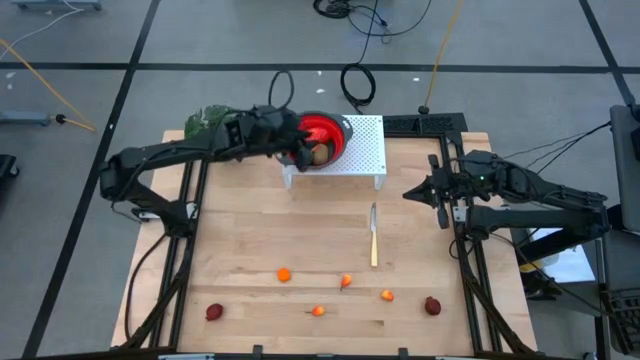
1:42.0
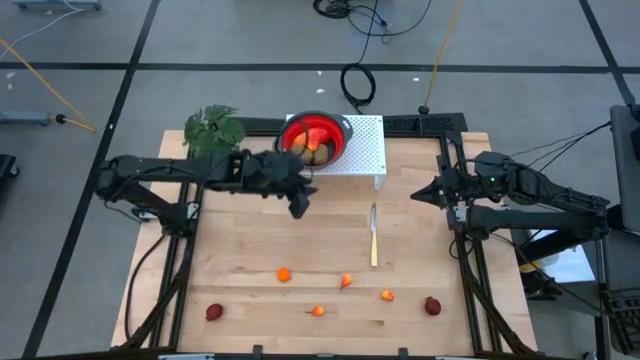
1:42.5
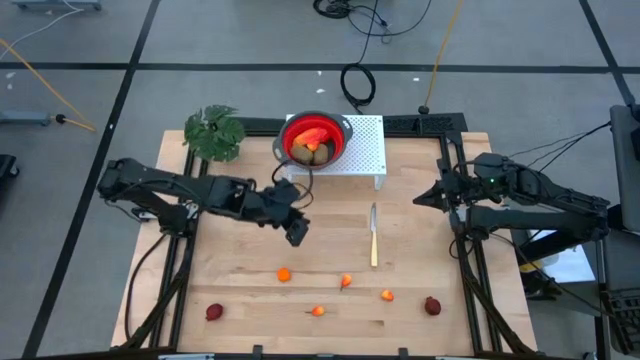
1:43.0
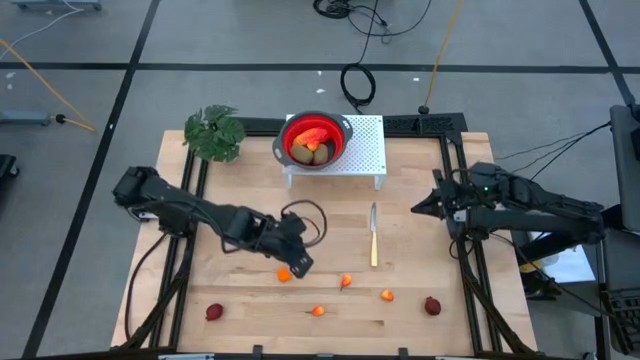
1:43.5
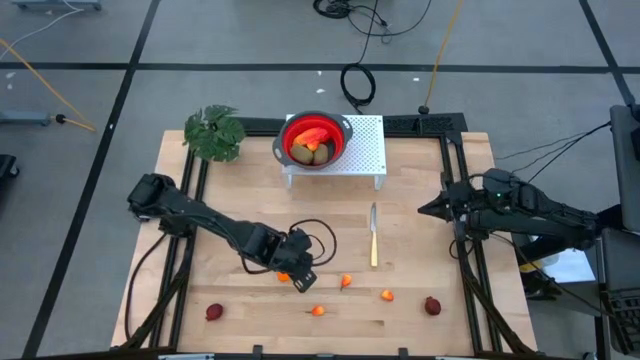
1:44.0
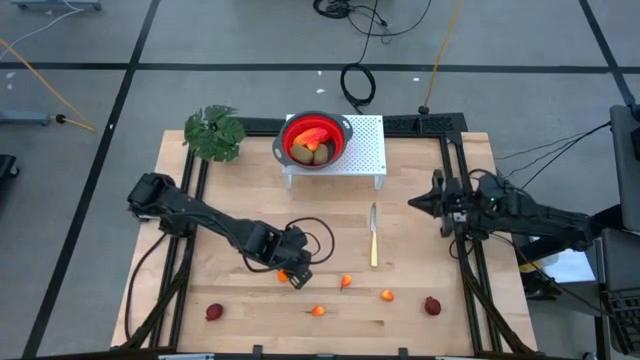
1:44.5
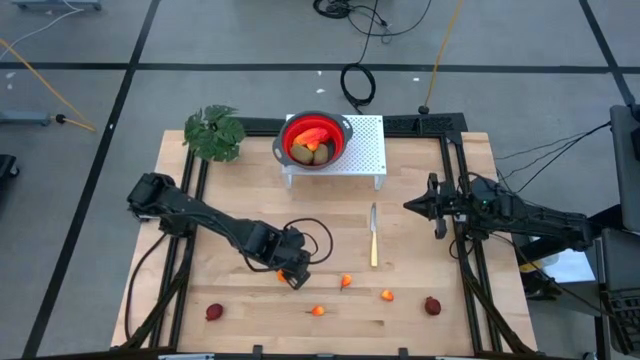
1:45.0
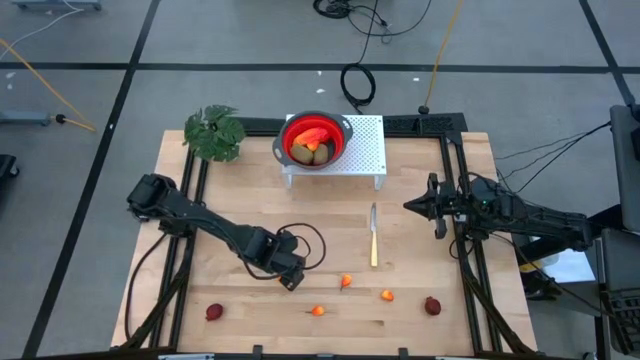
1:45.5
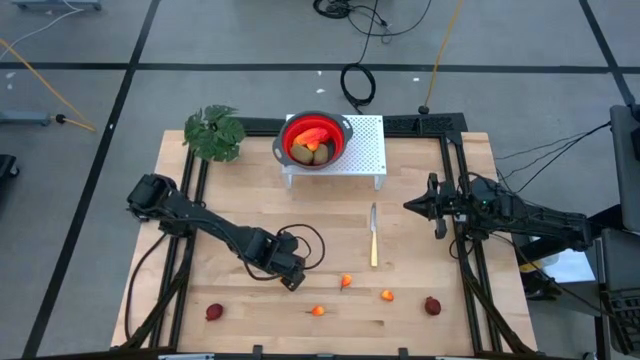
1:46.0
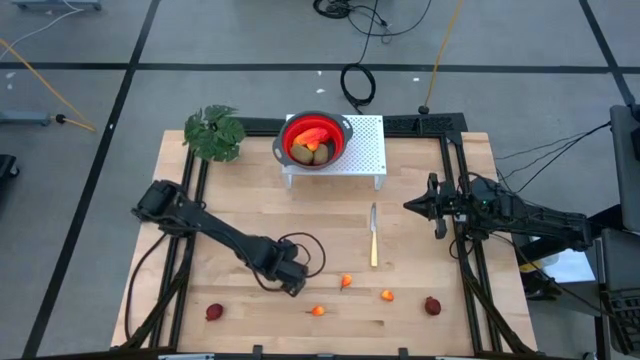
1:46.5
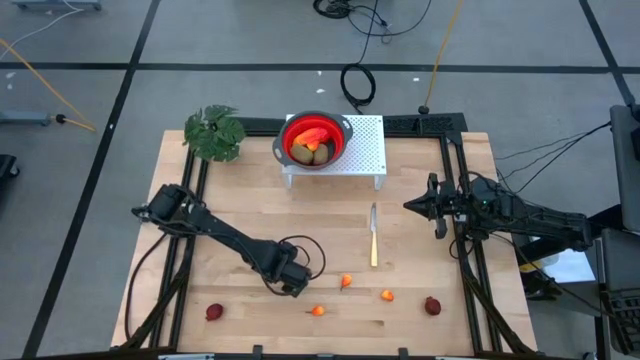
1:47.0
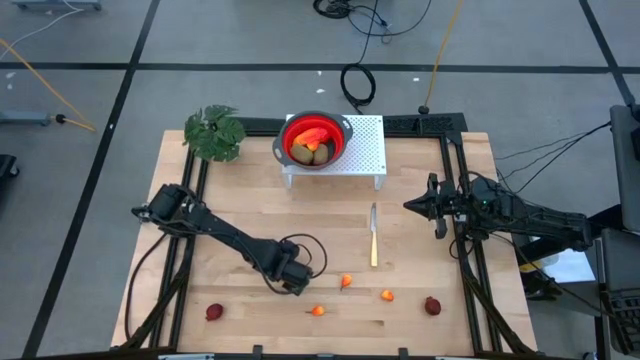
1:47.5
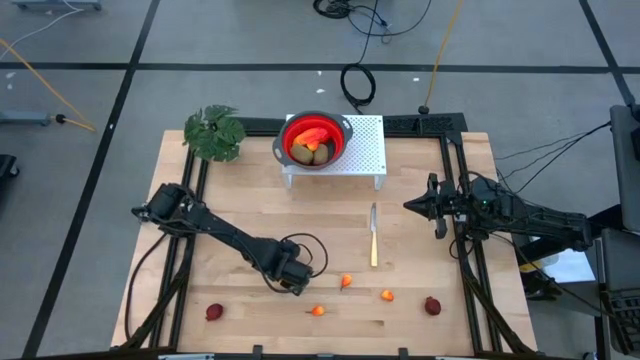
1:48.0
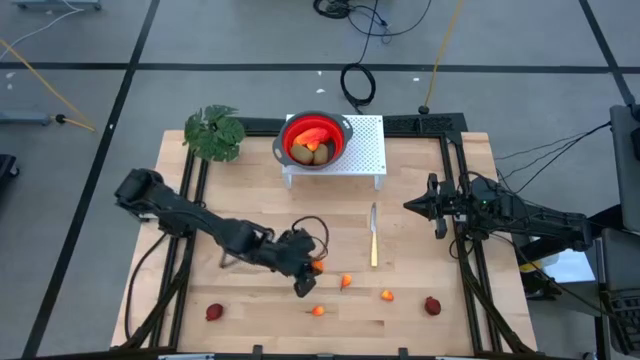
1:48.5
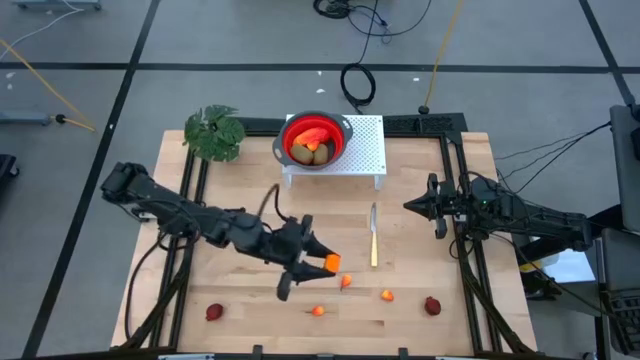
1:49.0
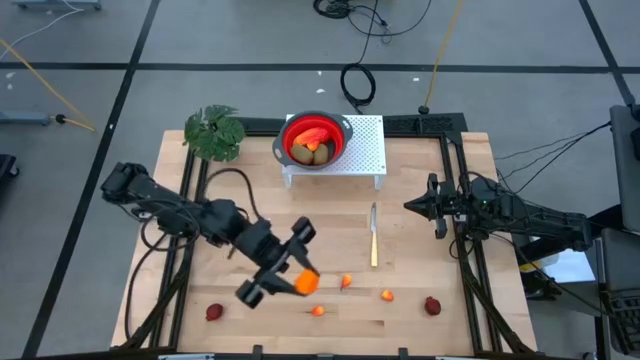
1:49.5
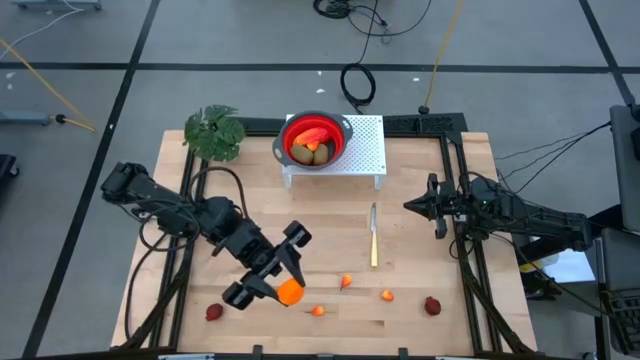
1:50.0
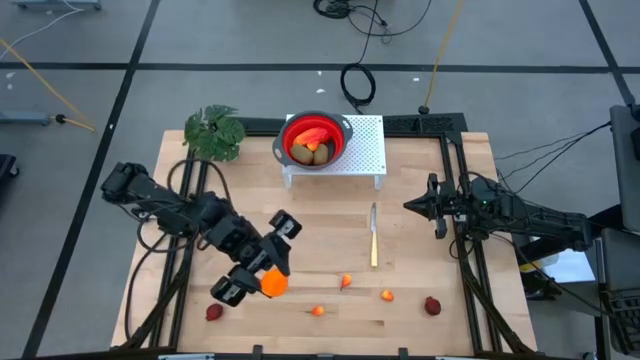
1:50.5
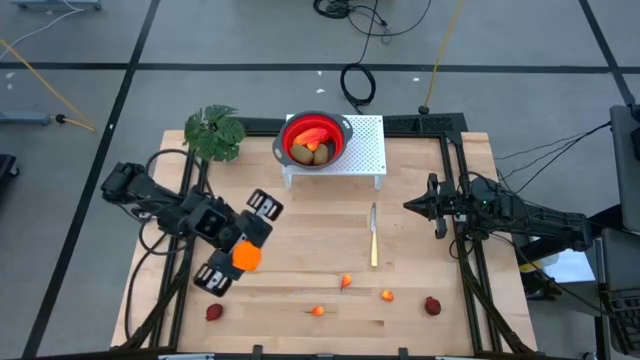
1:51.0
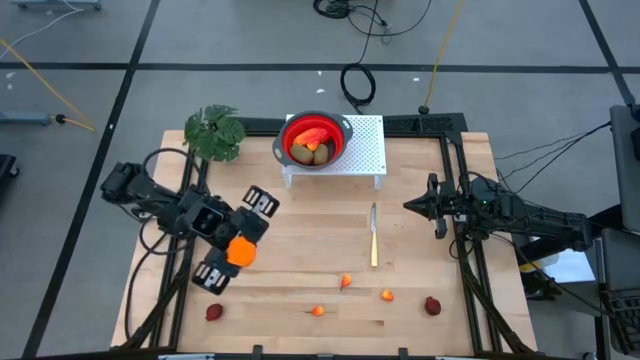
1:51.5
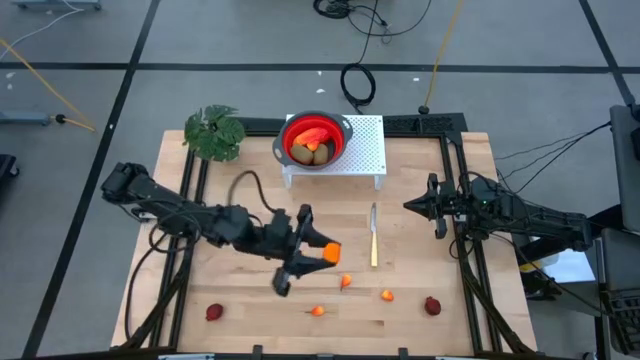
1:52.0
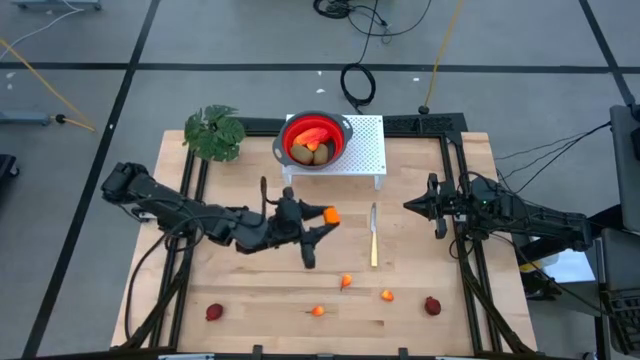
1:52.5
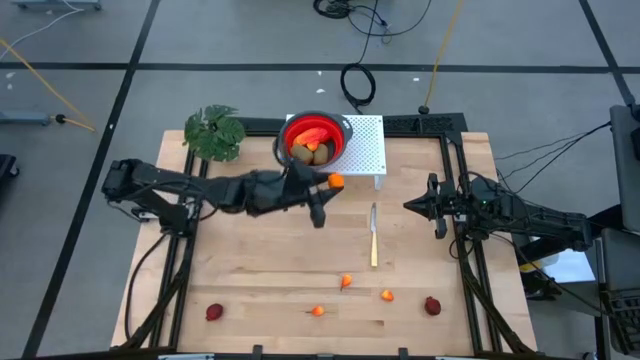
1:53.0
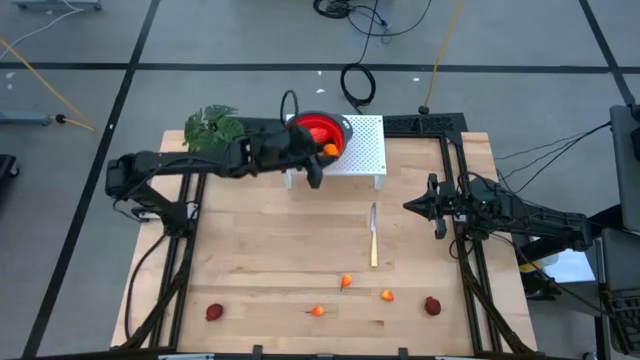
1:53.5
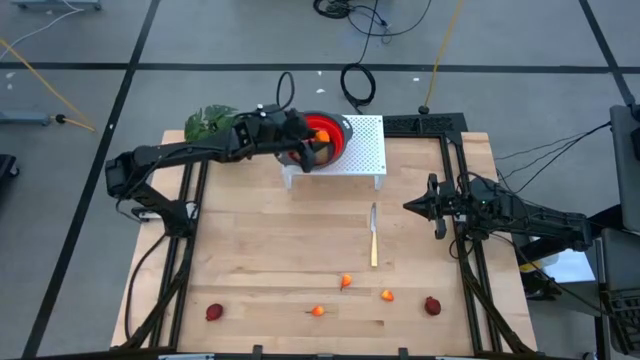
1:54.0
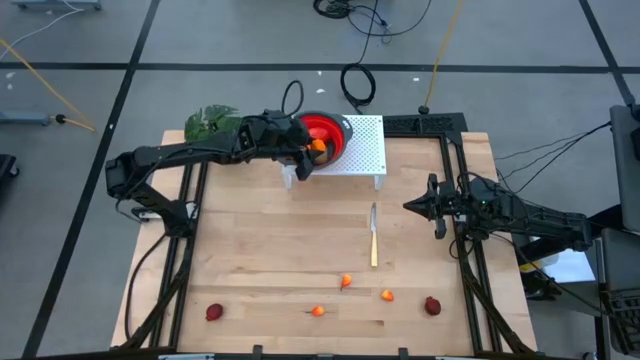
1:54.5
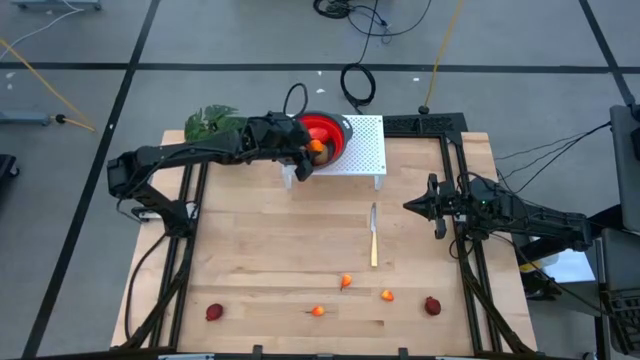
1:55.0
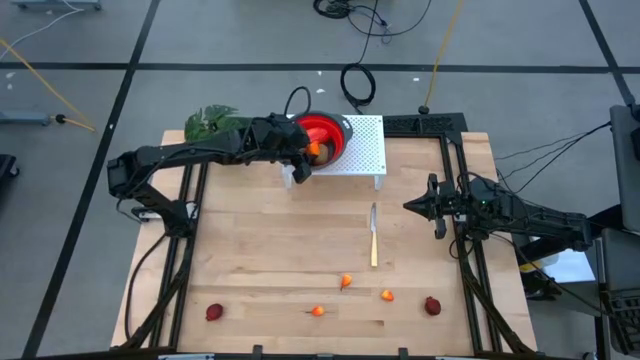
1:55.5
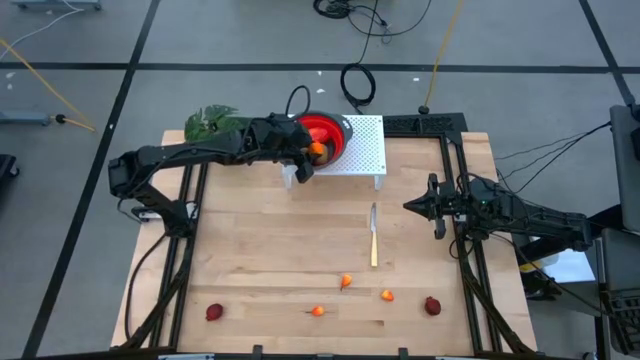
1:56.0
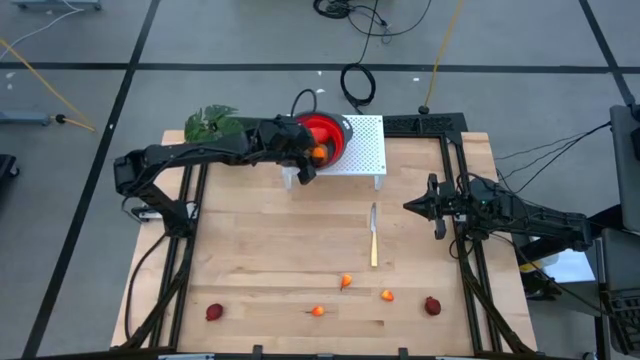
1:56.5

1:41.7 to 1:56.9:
Task: Pick & Place Fruit
Put the orange into the red strainer bowl on the shelf

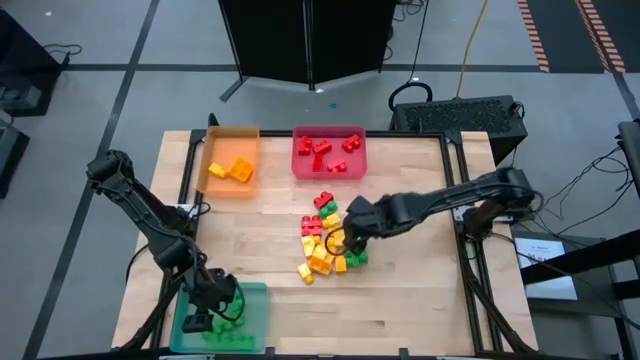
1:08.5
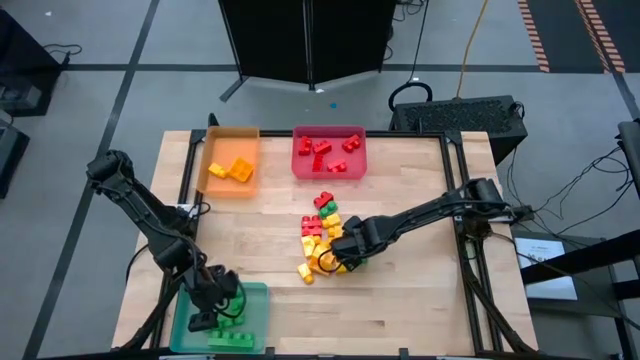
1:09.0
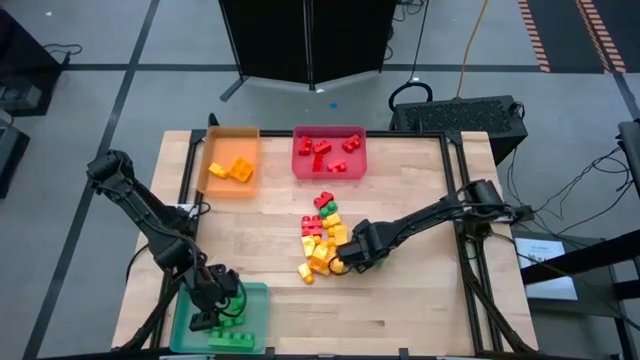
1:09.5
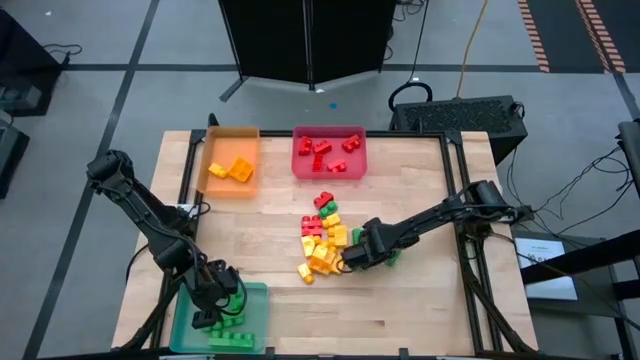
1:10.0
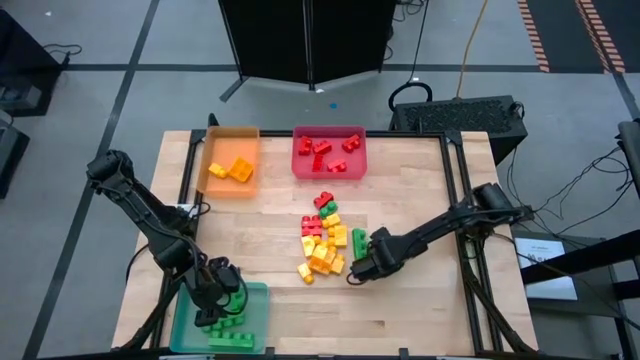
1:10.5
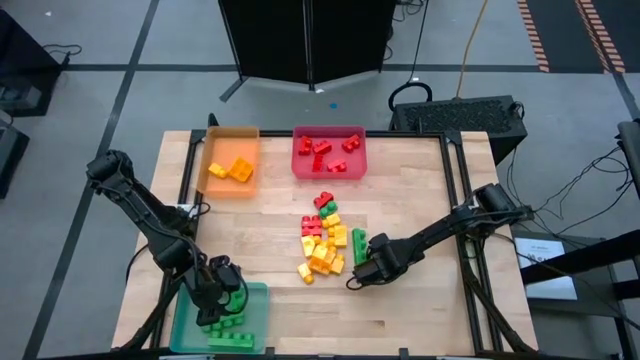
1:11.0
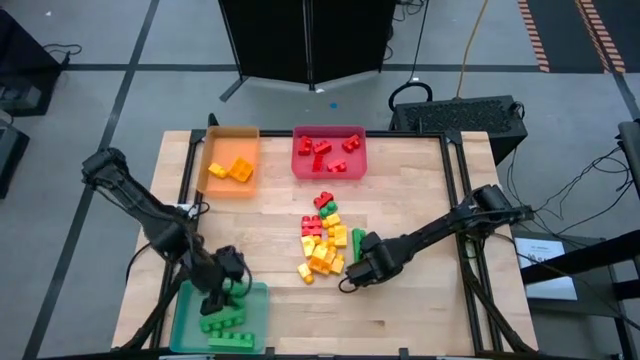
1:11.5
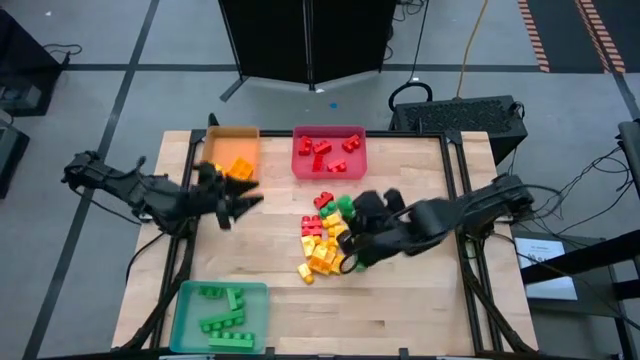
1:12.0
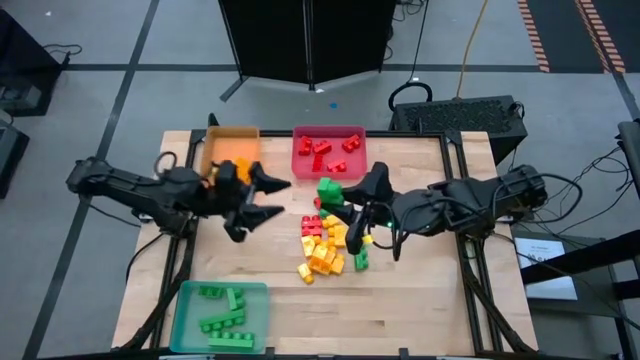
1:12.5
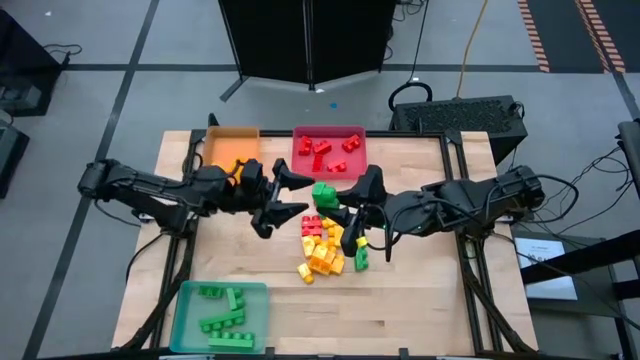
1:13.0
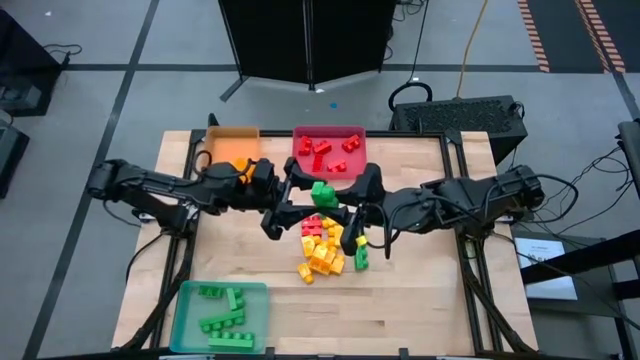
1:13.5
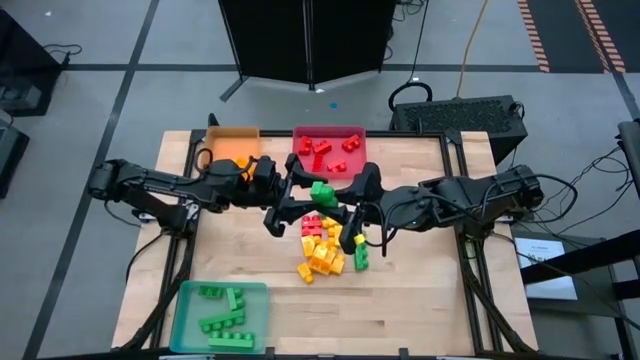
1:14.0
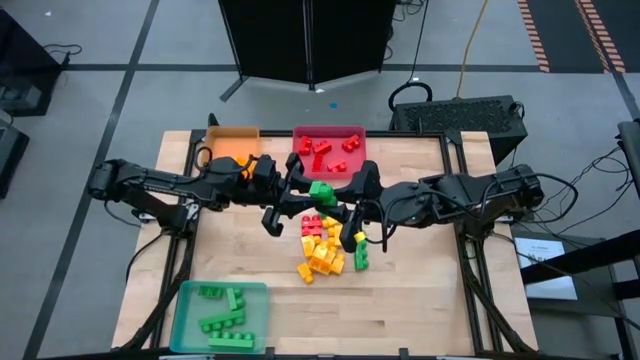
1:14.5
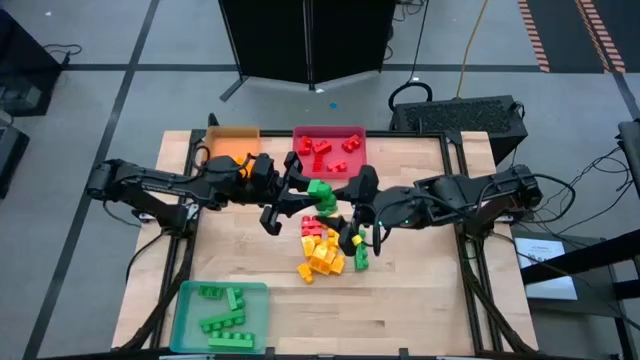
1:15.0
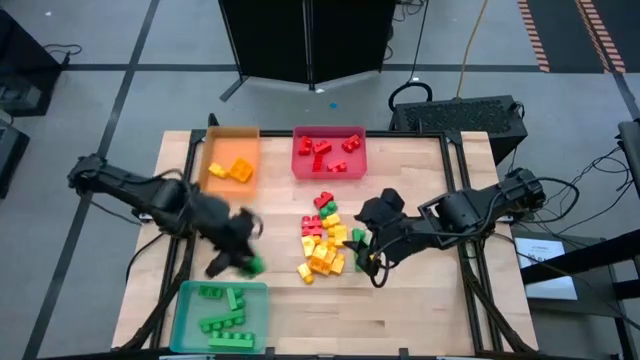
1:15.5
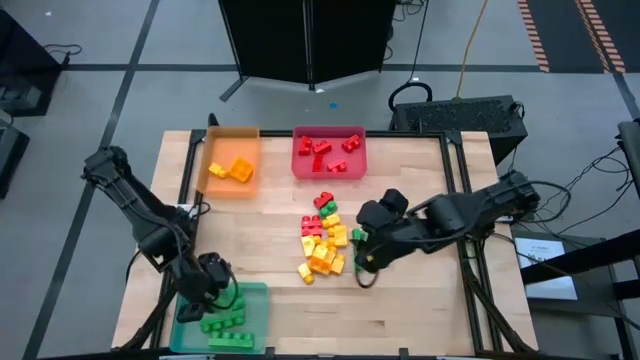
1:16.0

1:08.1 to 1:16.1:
Task: Sort blocks
Put the green game piece into the blue bin
